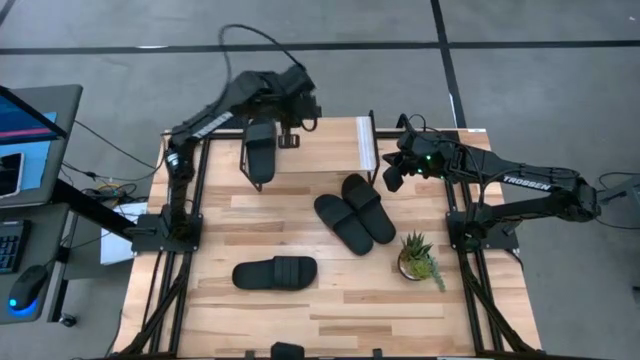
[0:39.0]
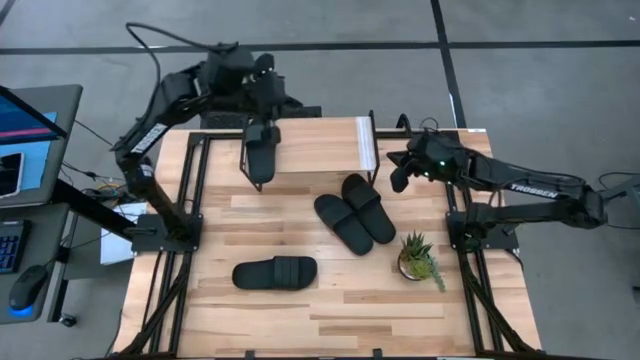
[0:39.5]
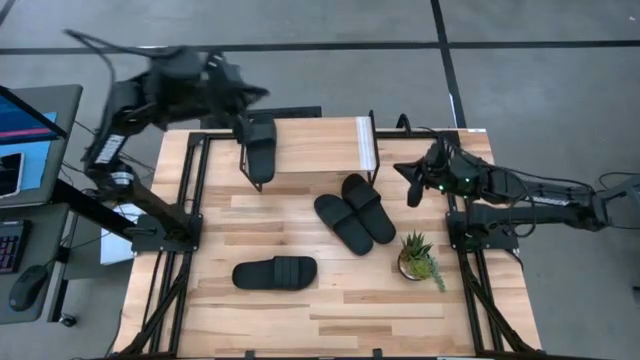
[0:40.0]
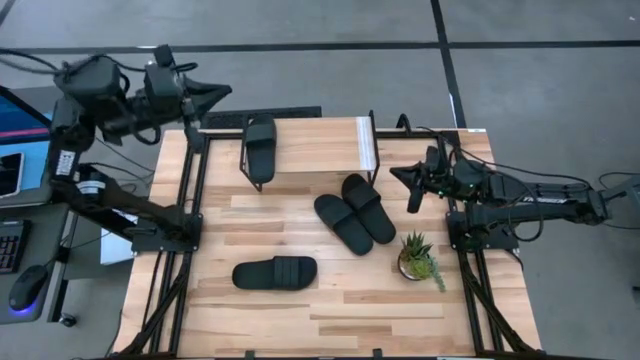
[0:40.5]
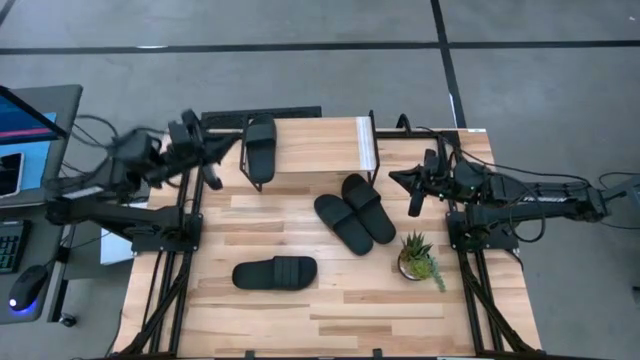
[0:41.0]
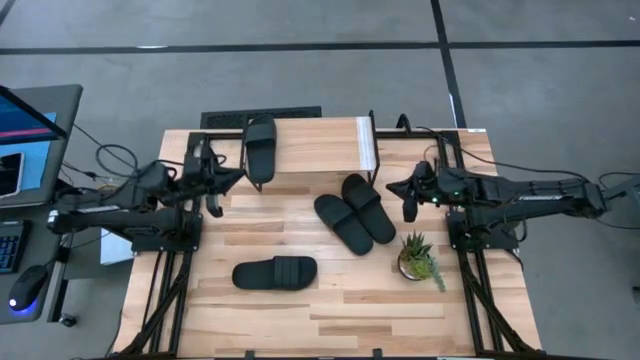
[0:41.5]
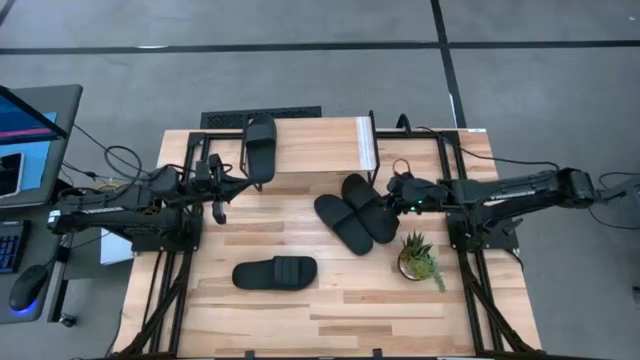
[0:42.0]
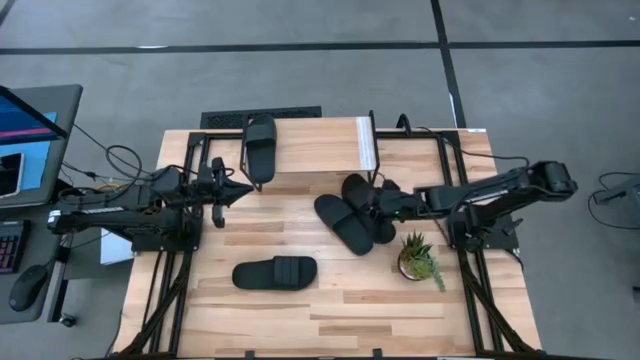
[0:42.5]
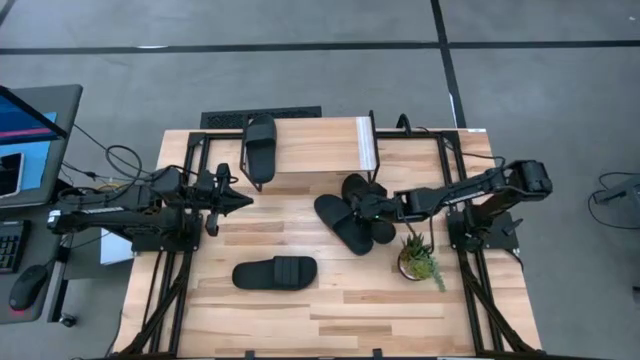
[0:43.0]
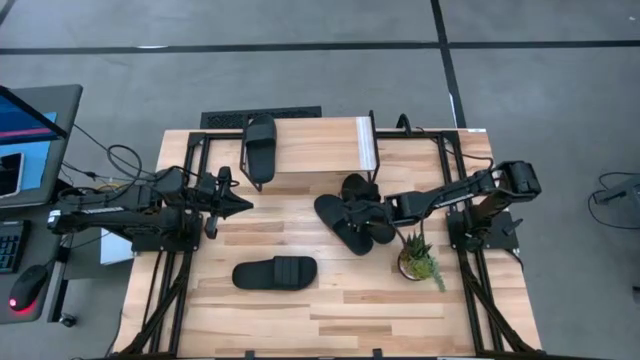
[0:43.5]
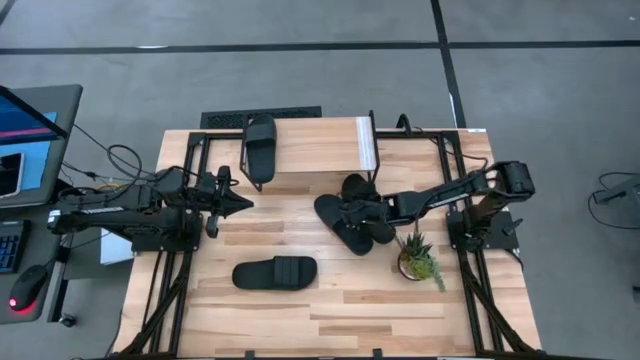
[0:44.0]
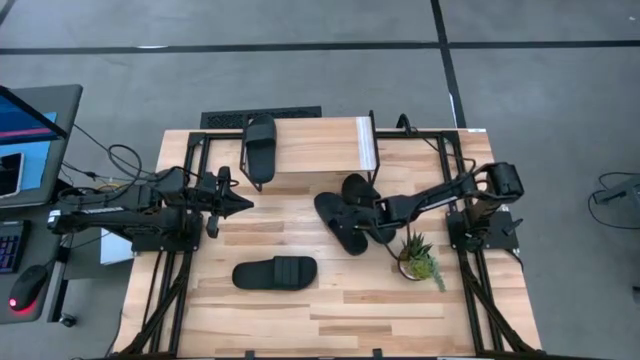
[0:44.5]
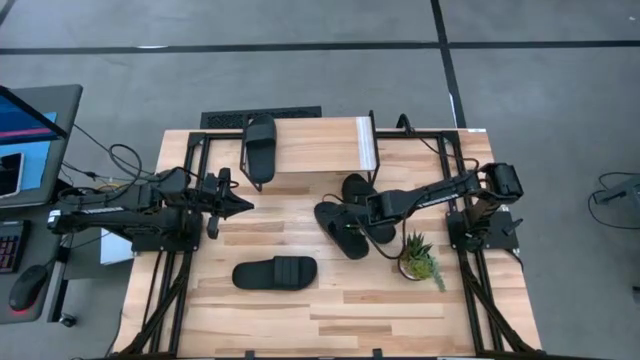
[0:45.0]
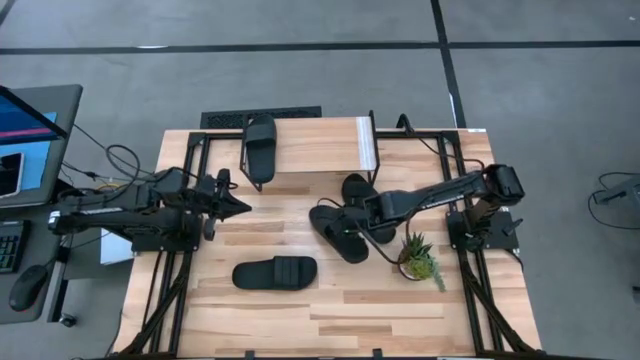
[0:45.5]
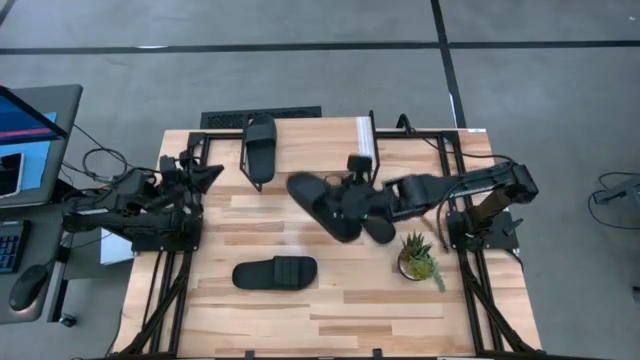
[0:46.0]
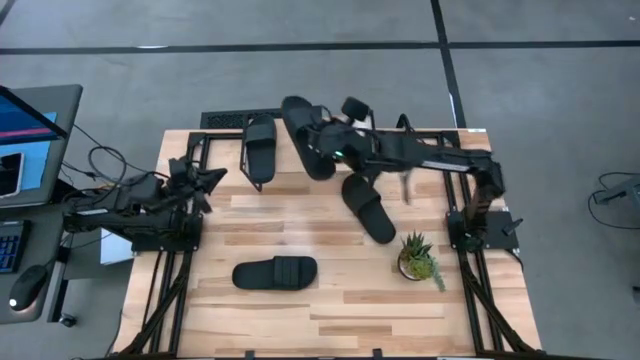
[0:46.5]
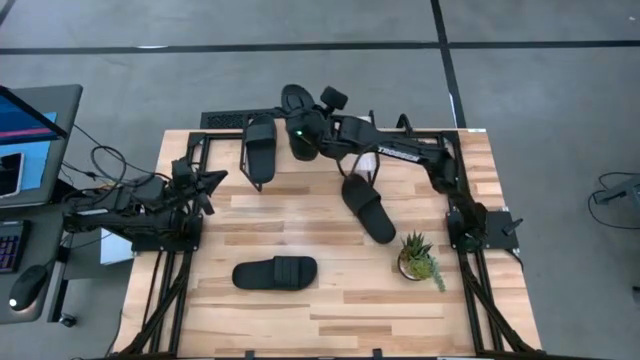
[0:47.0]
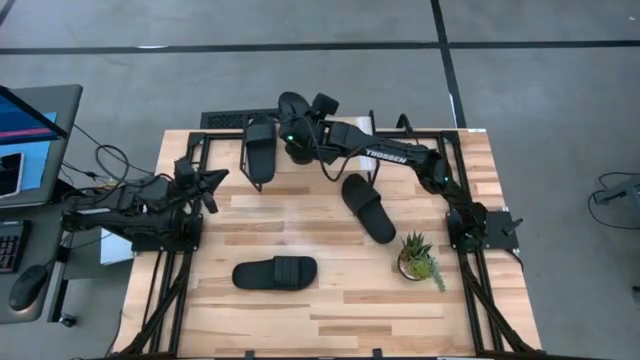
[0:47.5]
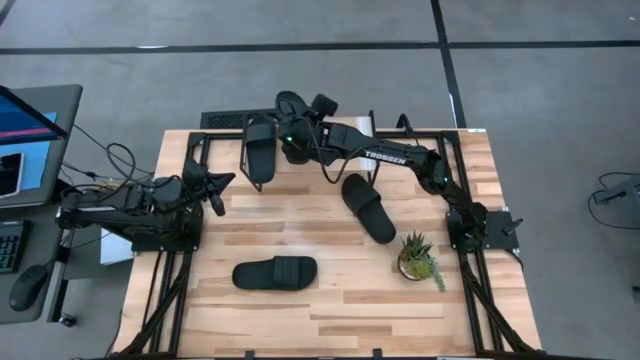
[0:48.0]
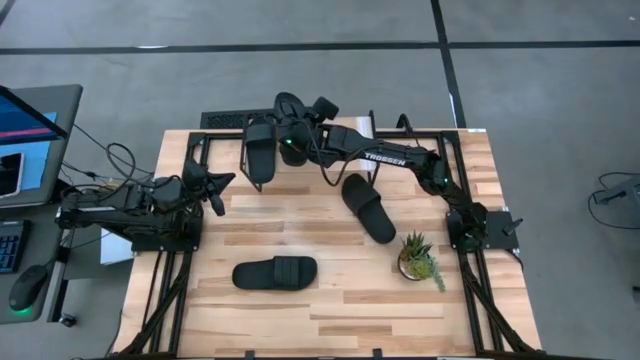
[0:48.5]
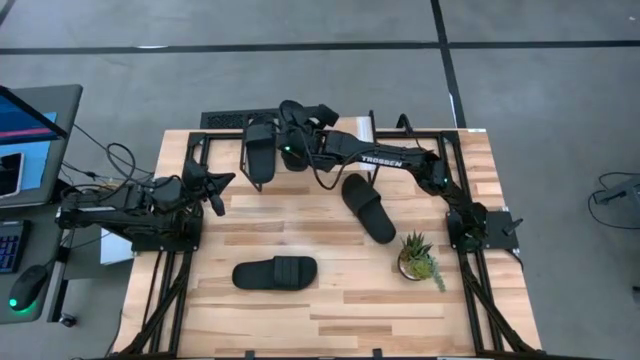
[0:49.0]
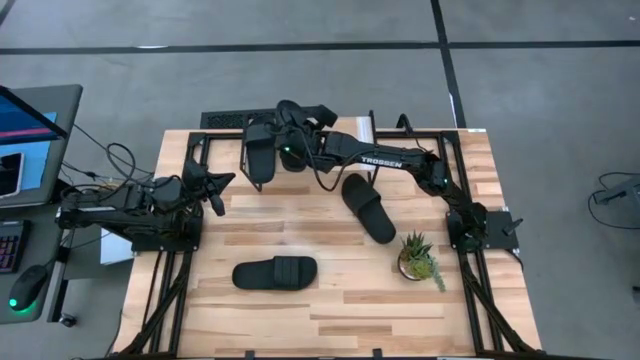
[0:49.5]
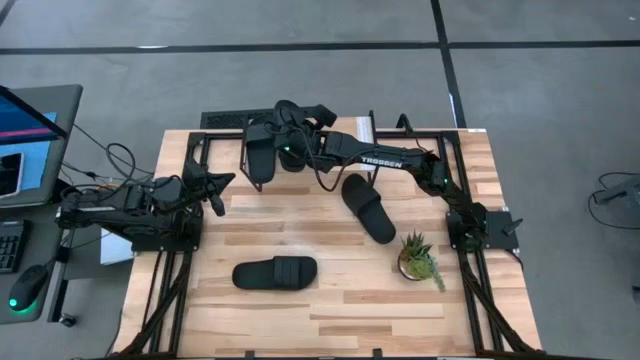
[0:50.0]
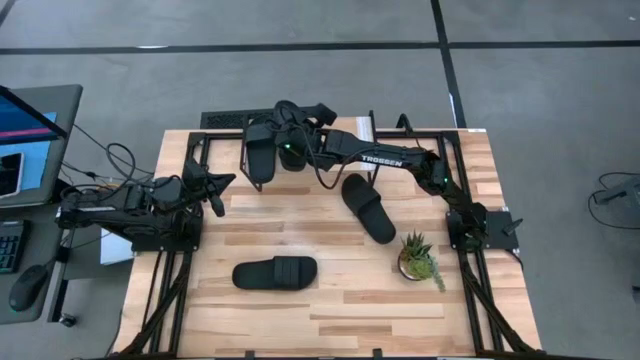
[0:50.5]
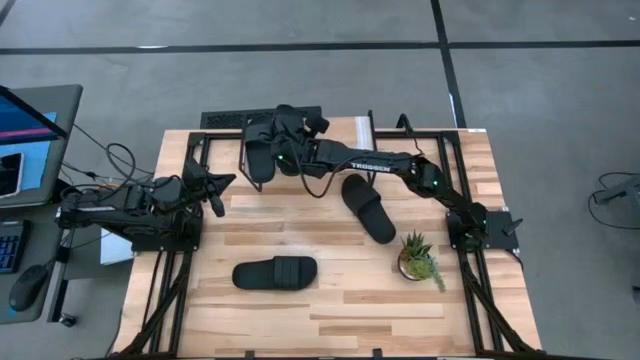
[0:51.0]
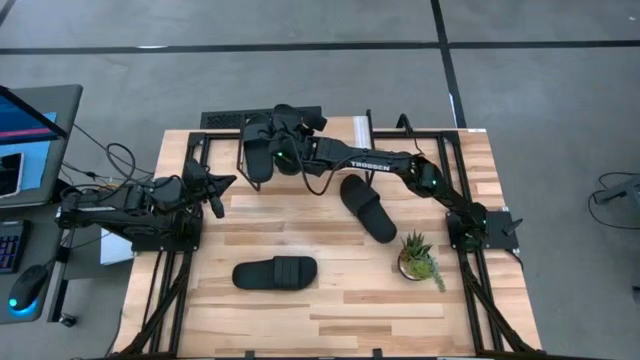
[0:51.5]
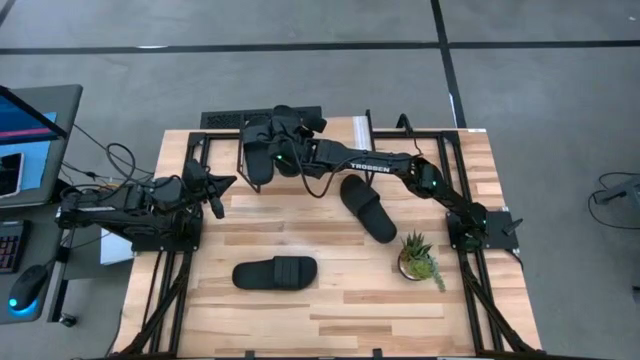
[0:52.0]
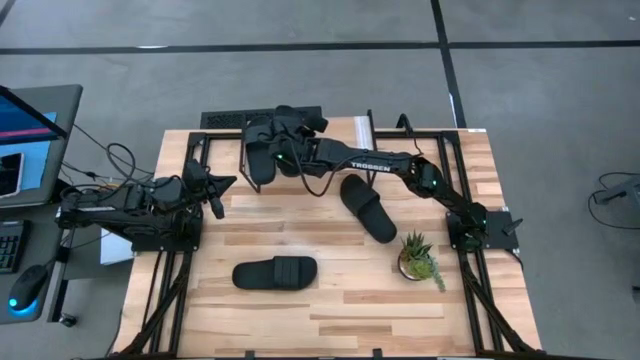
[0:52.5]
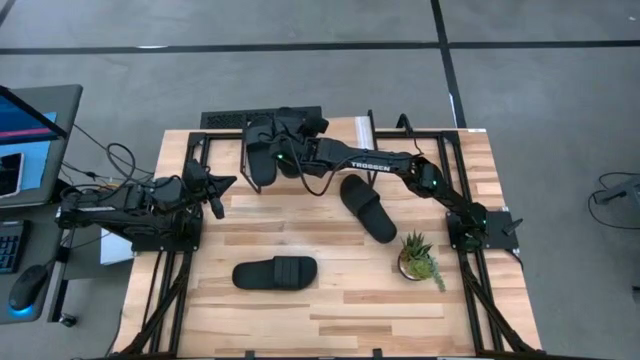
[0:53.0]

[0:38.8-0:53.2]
Task: Pick and place slides into the shelf
Put the black slipper on the shelf

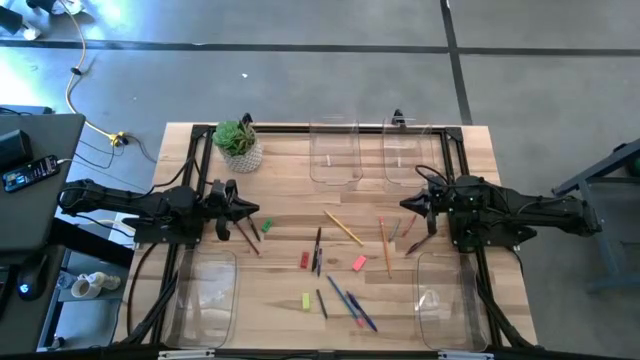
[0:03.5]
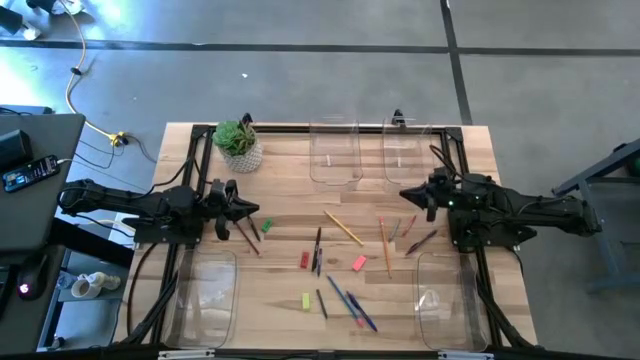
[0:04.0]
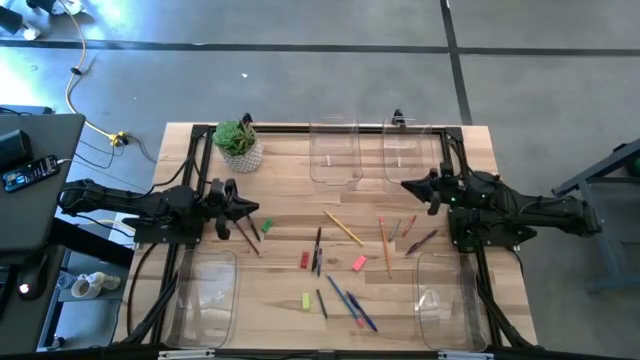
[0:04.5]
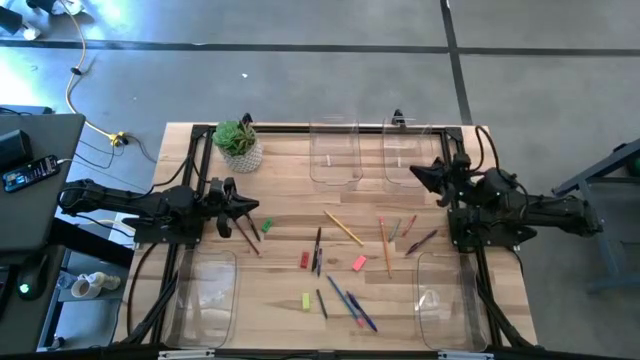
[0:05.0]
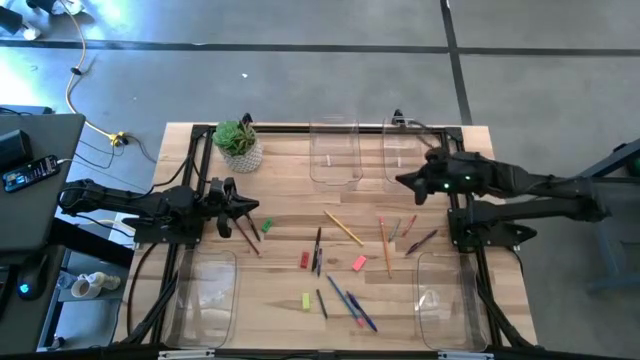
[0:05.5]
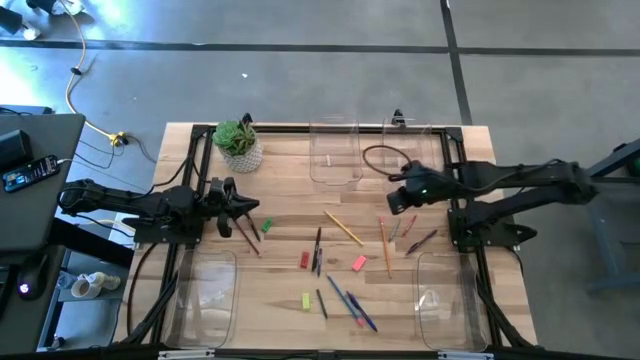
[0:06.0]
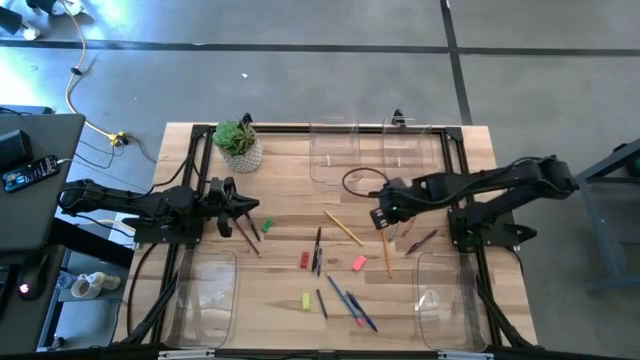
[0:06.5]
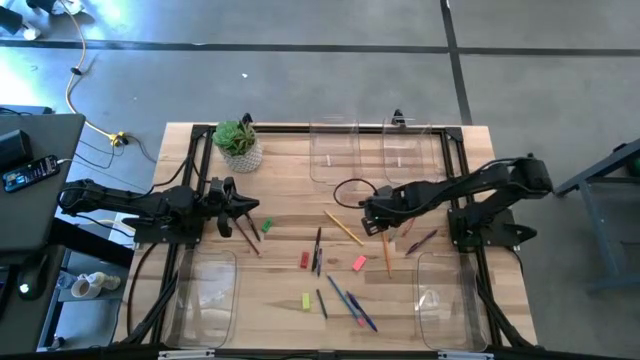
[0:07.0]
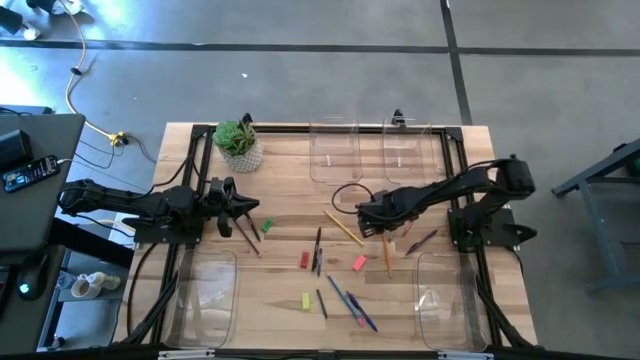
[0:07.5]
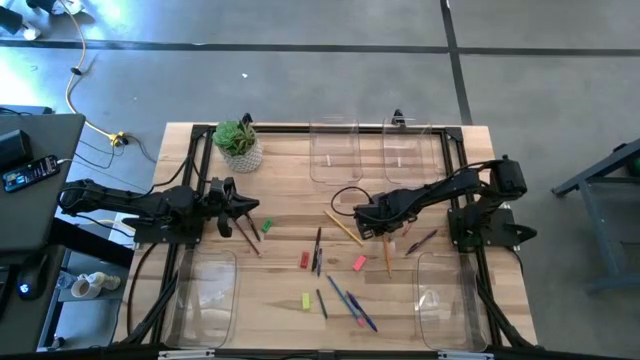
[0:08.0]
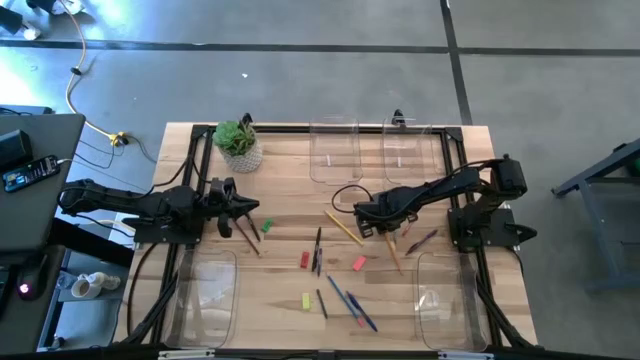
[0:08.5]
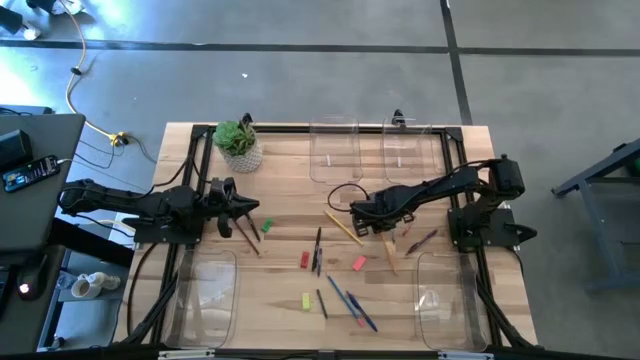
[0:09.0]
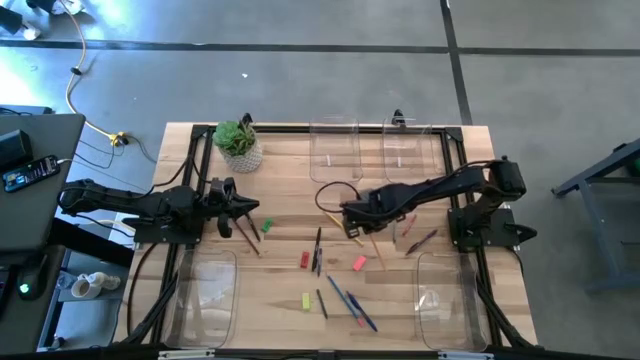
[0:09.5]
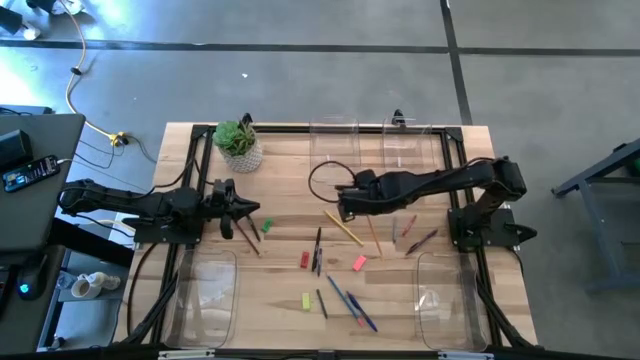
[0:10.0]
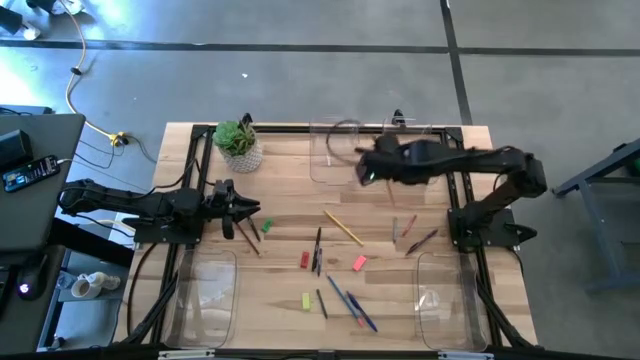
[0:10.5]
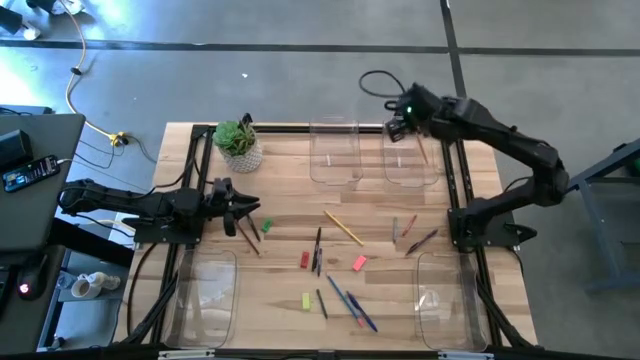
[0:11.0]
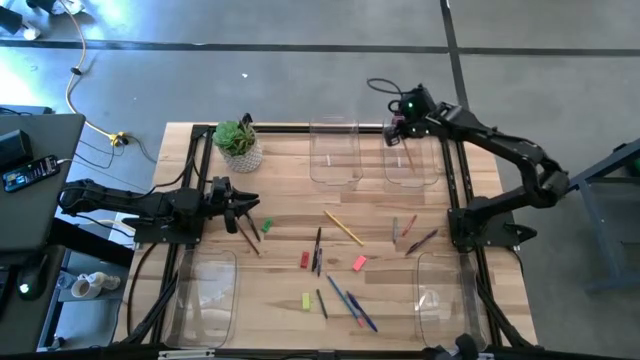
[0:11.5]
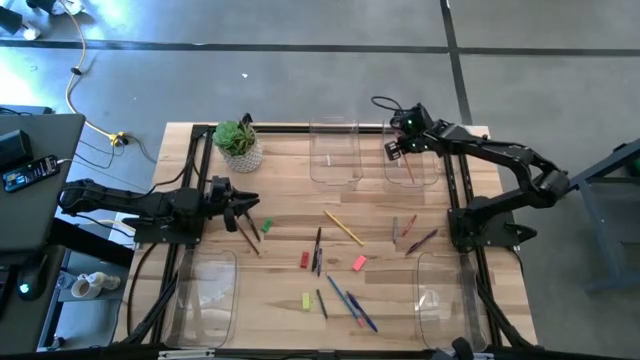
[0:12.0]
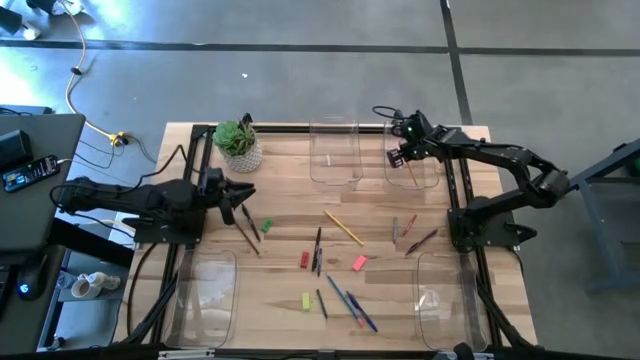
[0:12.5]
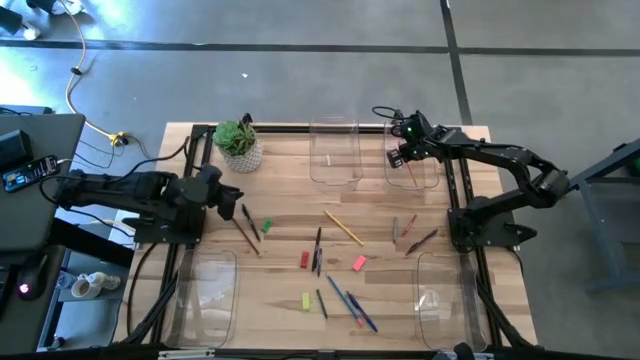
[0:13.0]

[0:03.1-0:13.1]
Task: Sort crayons/erasers/pens/pencils in bins
Put the orange pencil into the top right transparent bin
